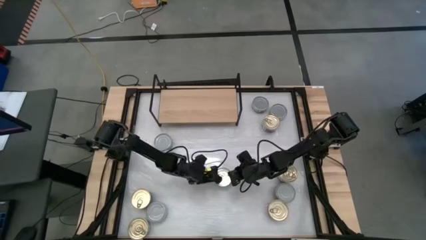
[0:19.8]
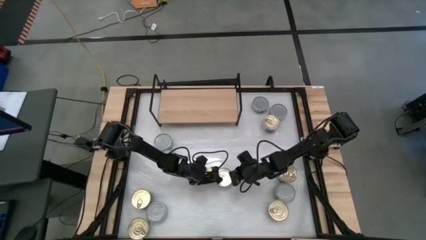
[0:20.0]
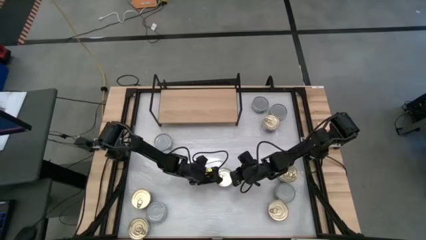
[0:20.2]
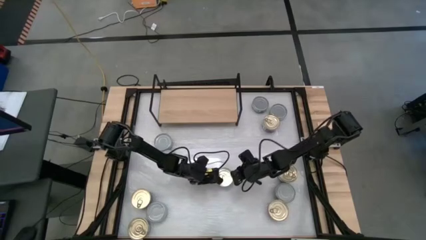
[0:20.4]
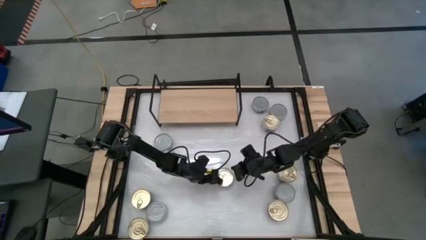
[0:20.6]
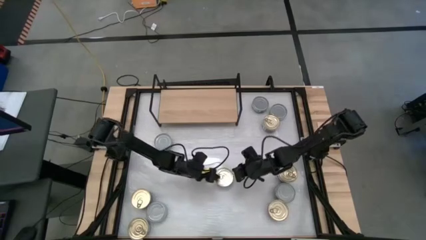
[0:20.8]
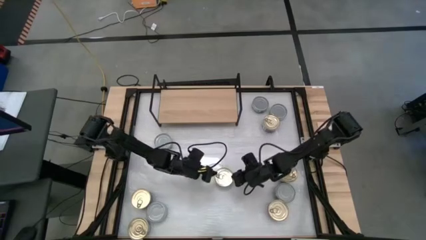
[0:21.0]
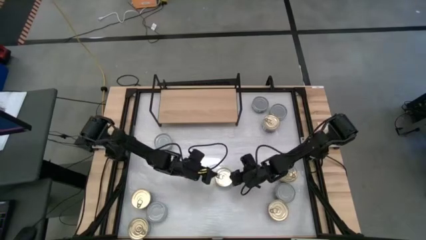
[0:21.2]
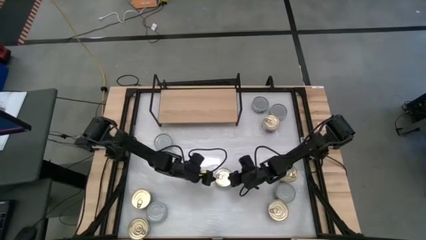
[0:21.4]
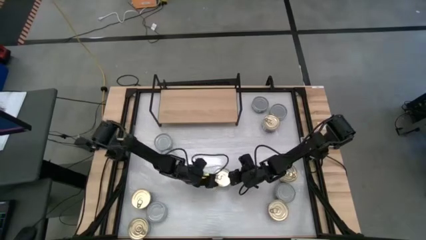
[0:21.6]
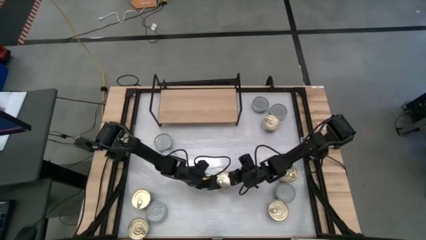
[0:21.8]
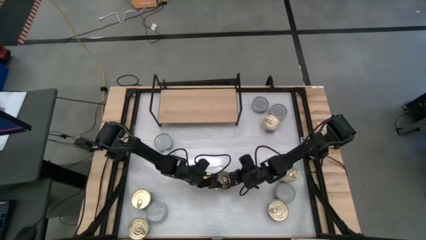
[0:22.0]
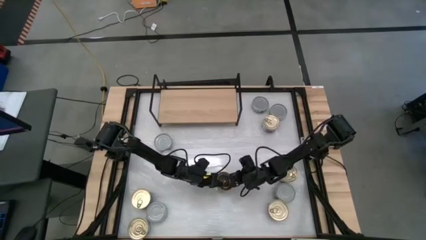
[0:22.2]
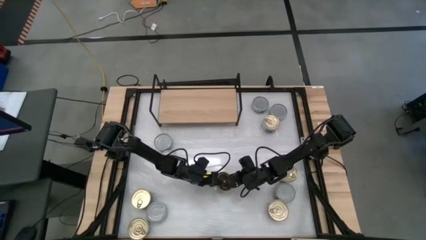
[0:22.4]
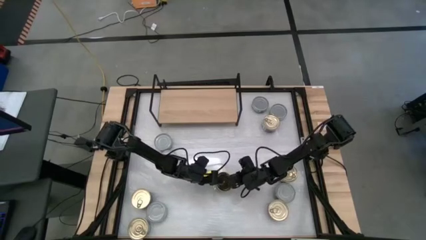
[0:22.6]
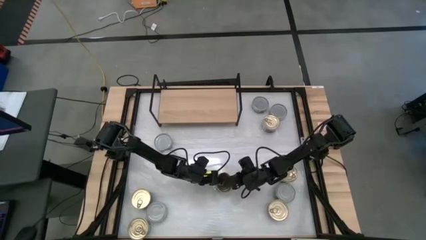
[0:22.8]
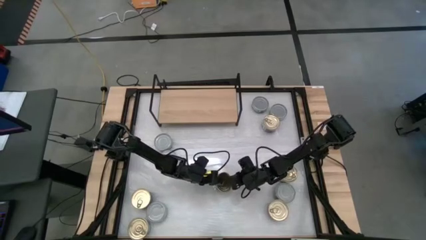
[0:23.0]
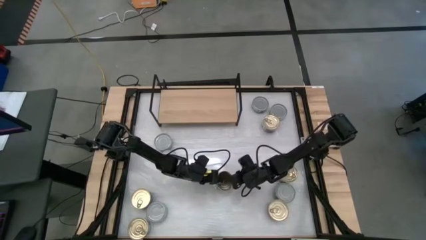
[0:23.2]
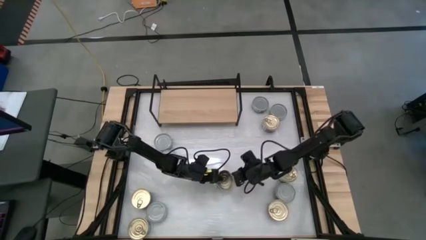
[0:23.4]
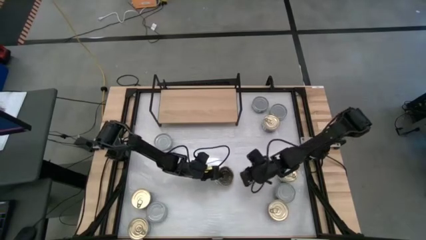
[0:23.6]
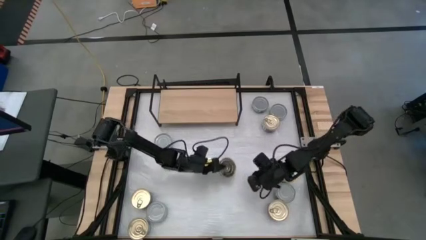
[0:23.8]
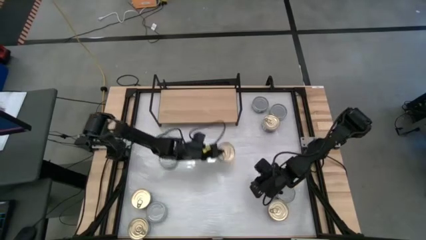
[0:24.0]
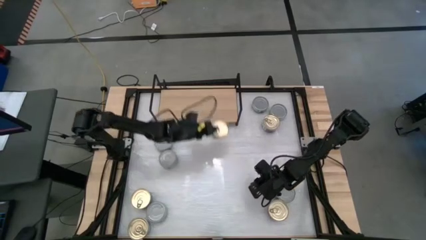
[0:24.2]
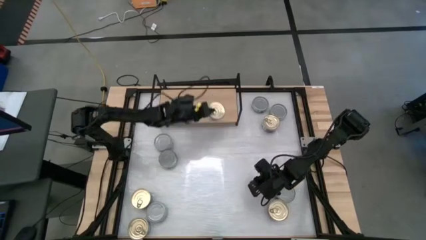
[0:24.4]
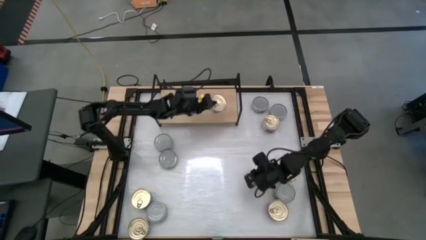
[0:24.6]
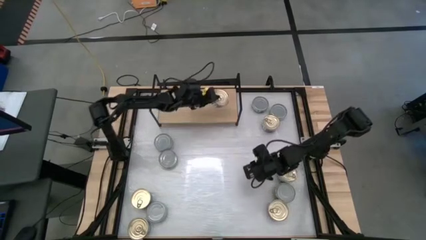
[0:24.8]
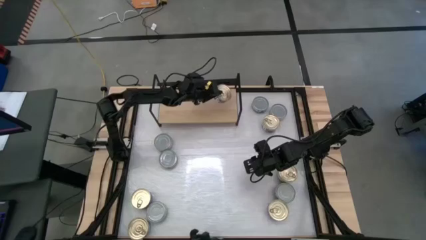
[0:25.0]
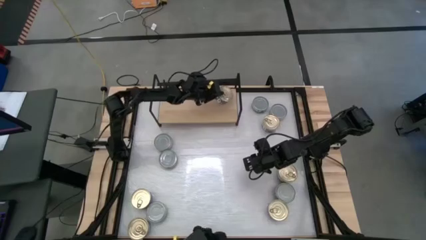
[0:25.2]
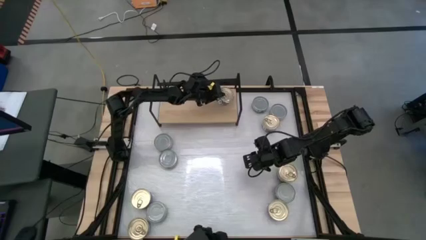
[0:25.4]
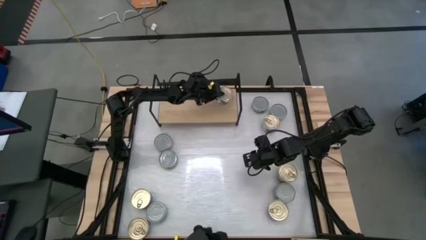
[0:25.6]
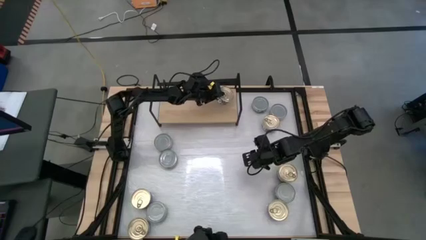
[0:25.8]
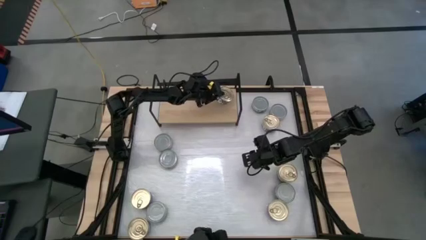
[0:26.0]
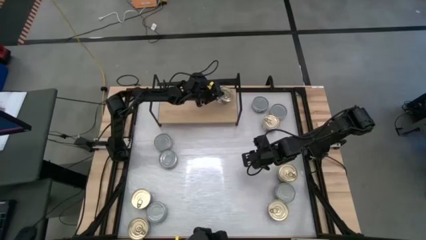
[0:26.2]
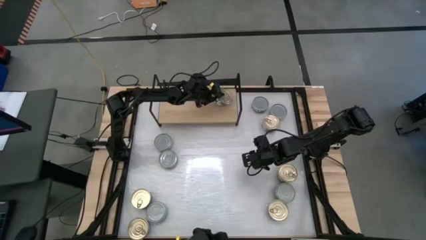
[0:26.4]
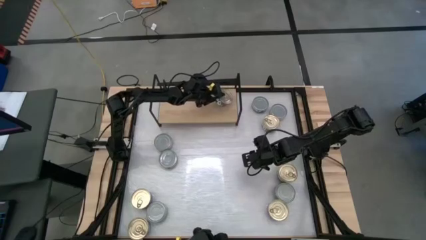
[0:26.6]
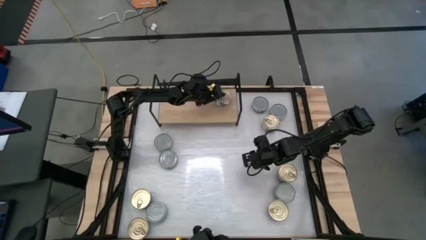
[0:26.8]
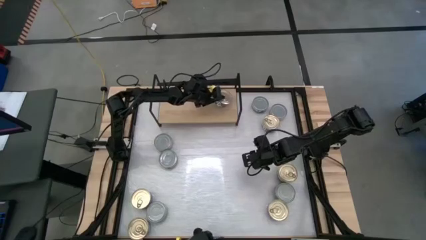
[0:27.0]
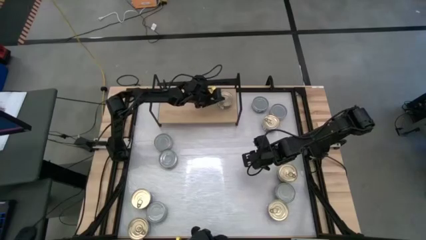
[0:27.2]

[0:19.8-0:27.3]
Task: Stack canned seafood by type on shelf
Put the blue tuna can on the shelf

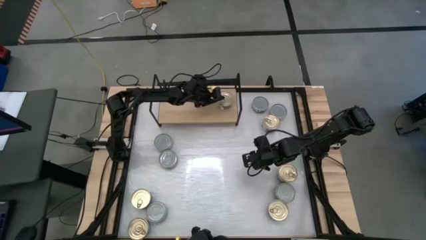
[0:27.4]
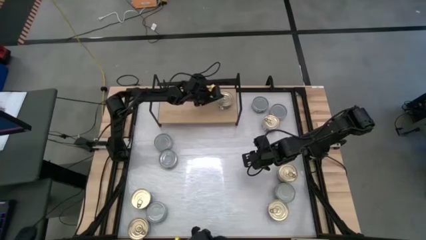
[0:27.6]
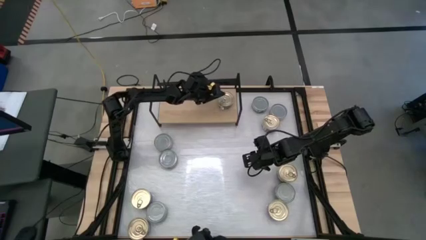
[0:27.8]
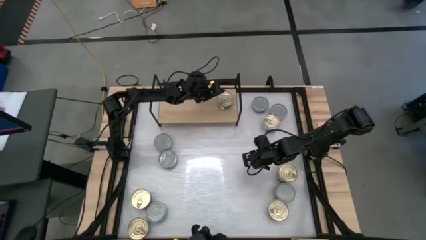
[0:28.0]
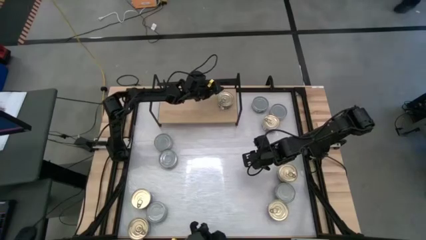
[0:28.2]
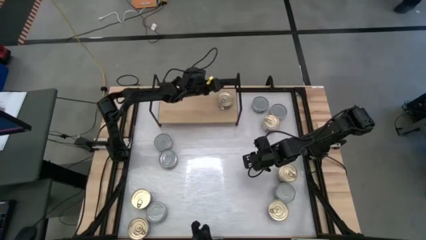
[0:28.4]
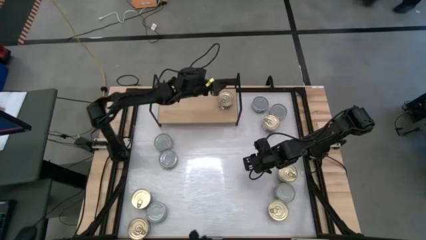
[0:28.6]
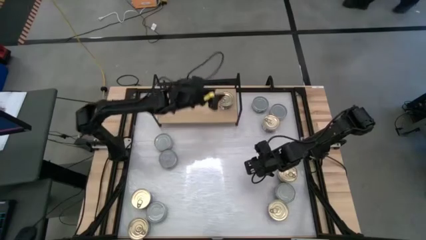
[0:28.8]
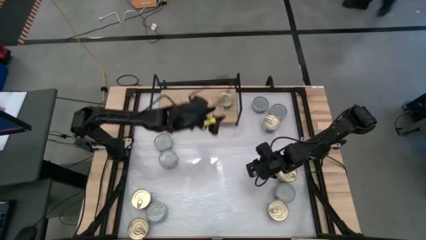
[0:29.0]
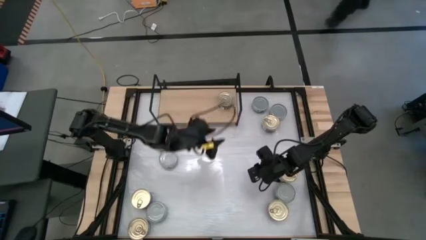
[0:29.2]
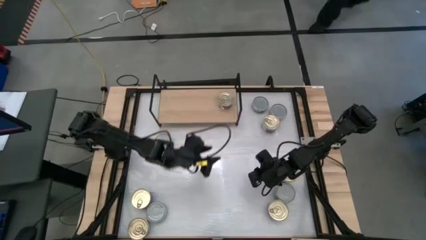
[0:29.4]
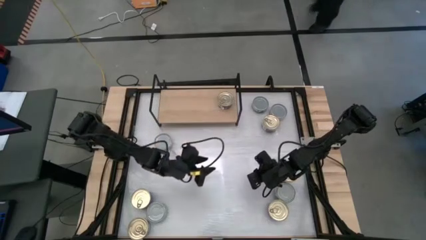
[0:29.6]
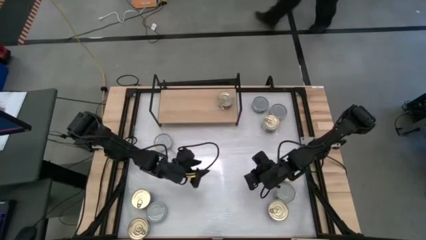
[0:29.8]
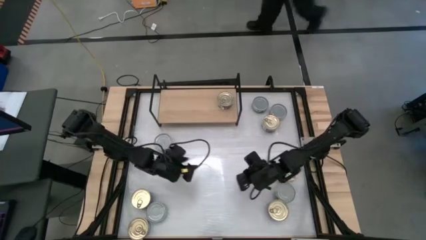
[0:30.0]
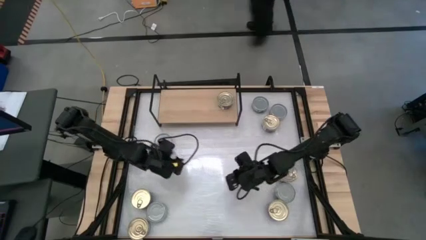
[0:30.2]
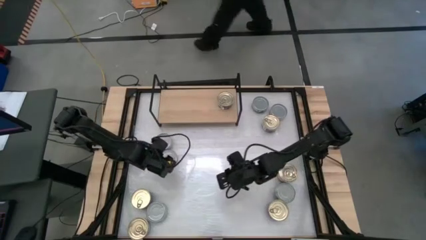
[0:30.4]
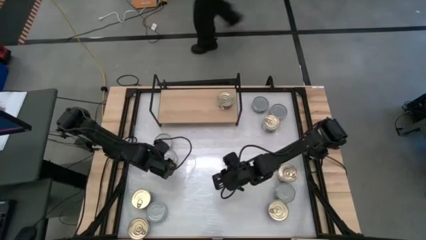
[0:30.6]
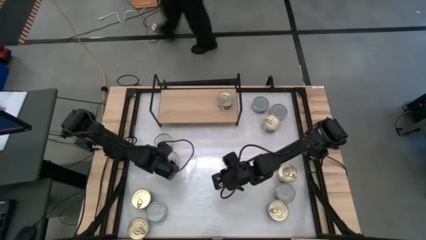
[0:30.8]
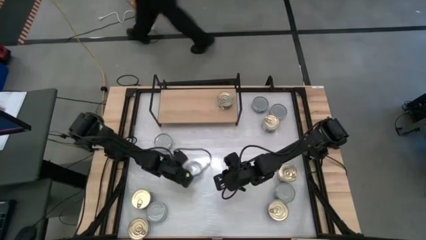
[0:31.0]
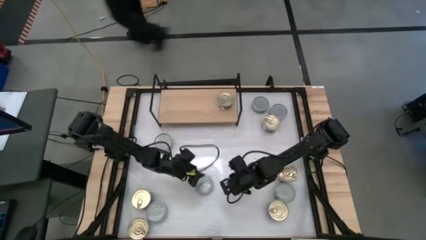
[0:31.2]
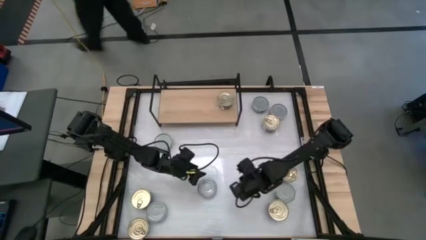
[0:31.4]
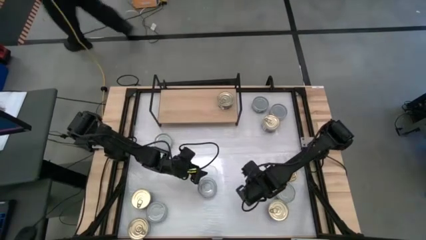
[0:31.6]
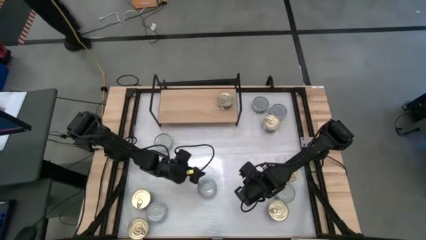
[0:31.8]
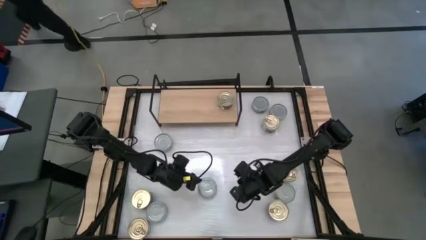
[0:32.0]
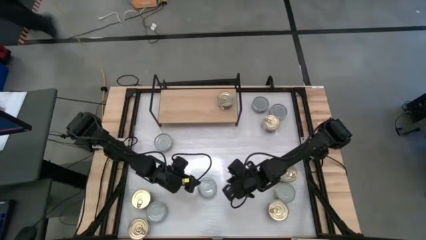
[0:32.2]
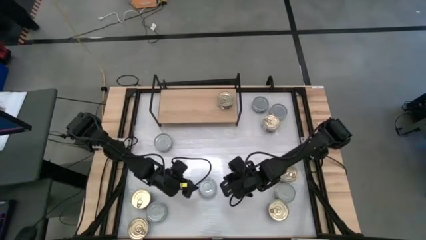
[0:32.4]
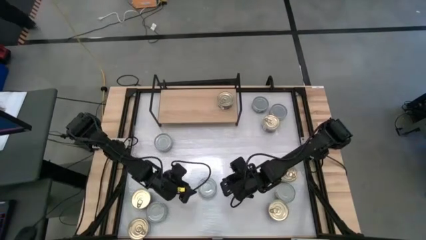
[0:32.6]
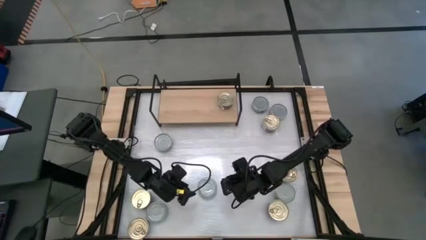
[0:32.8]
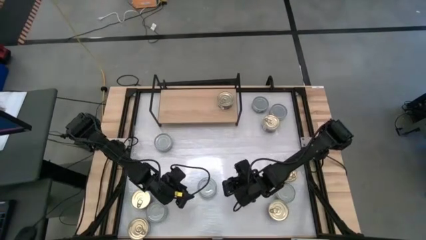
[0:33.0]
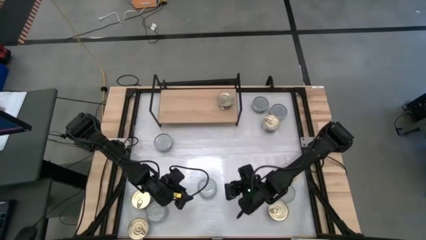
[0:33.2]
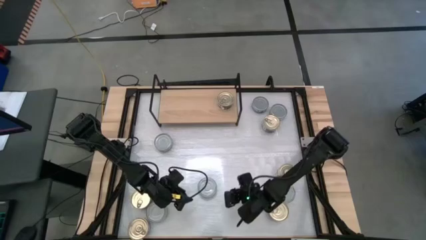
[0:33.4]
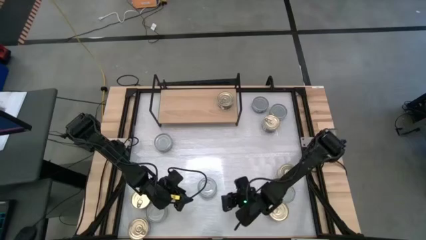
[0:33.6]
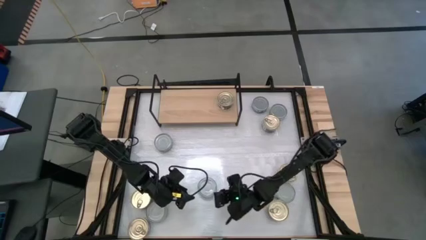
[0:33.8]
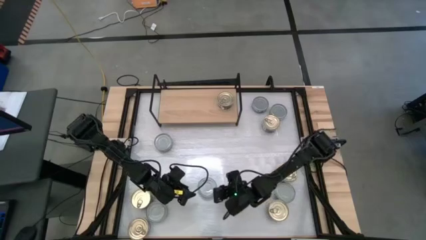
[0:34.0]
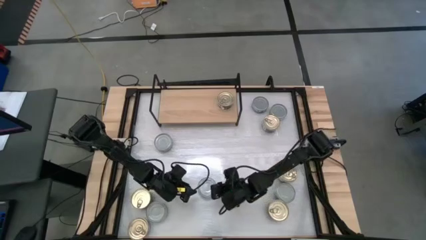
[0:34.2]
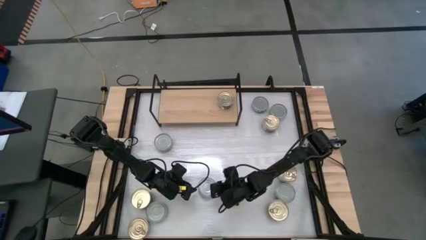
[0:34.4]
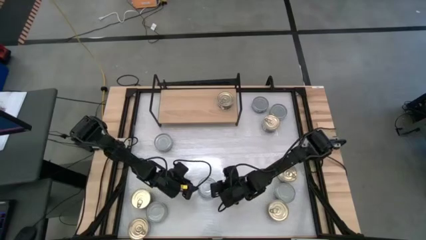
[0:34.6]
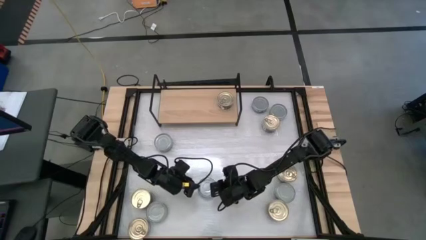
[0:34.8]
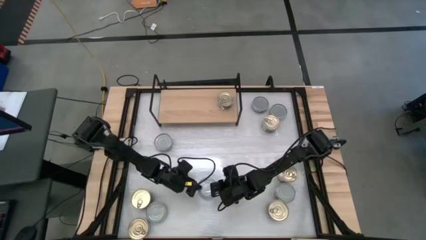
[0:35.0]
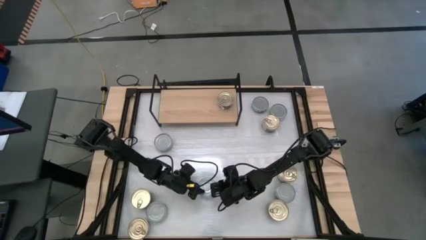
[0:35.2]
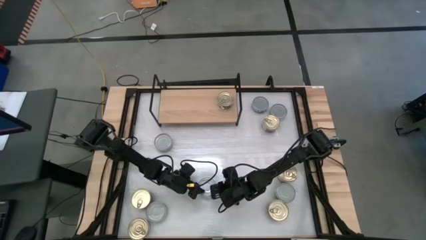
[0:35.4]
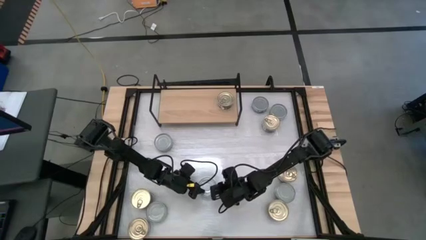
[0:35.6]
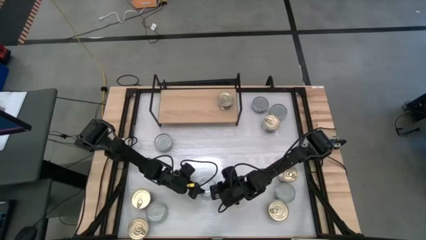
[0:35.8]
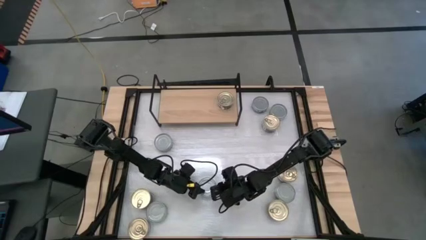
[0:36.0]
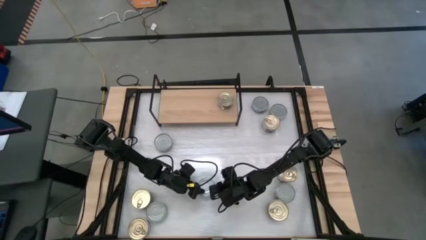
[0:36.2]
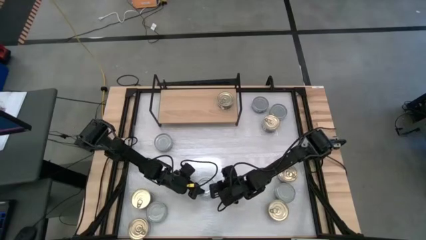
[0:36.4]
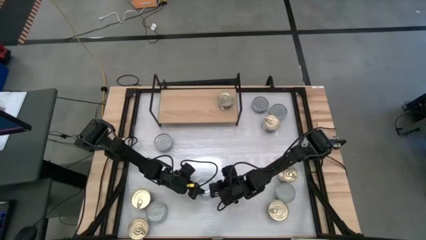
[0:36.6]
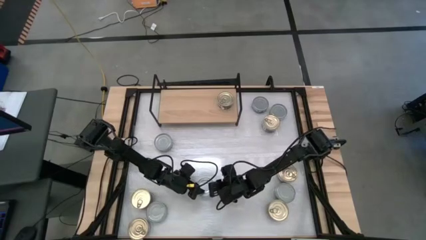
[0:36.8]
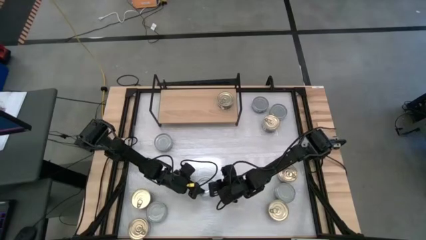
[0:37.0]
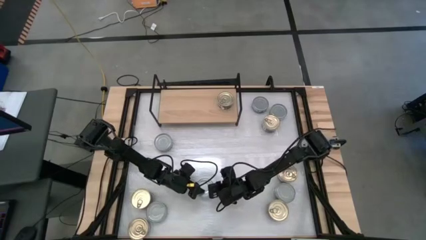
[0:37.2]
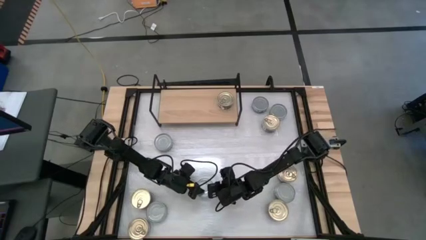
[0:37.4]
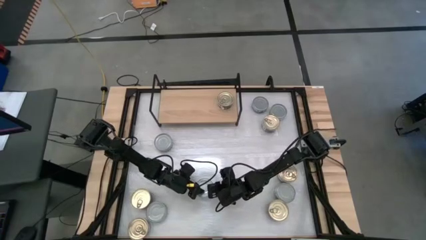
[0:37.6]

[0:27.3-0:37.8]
Put the green tuna can on the shelf
